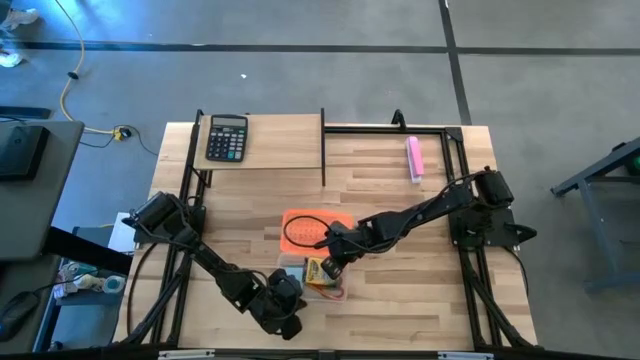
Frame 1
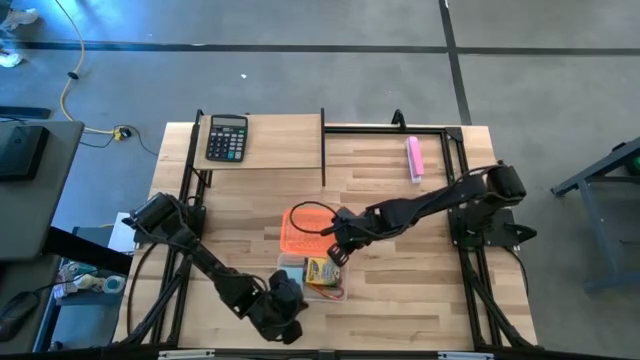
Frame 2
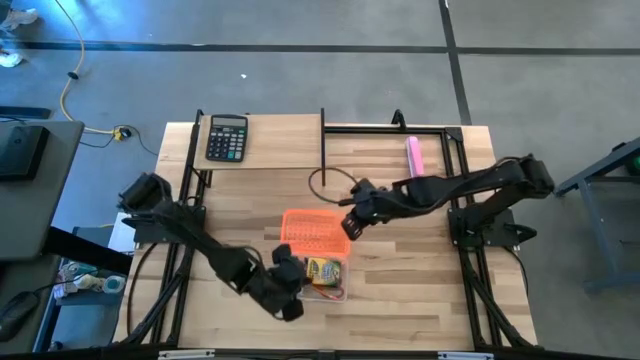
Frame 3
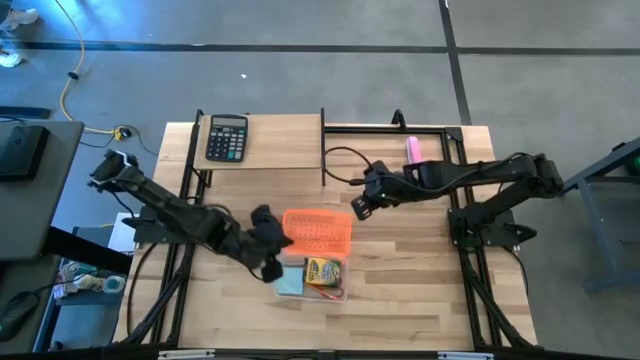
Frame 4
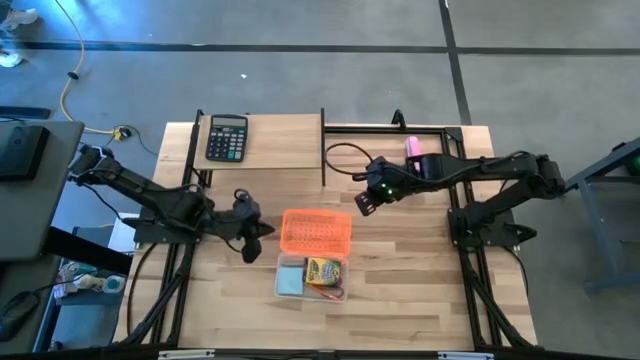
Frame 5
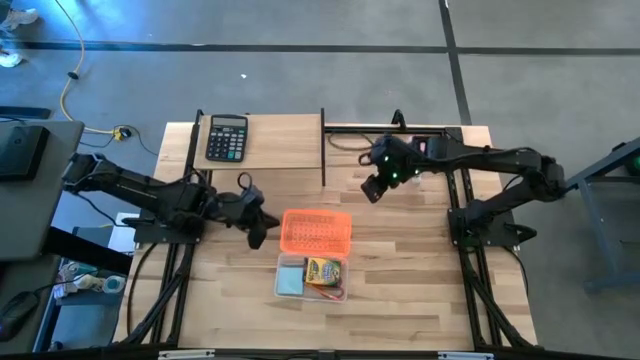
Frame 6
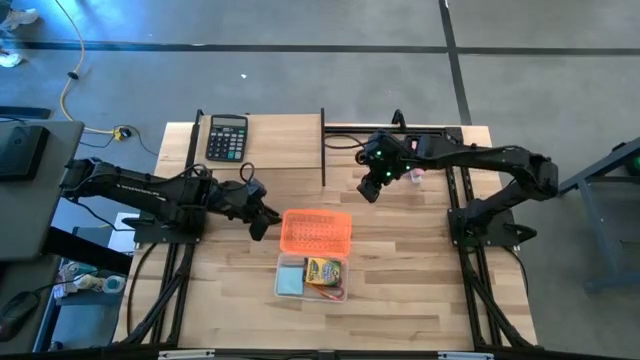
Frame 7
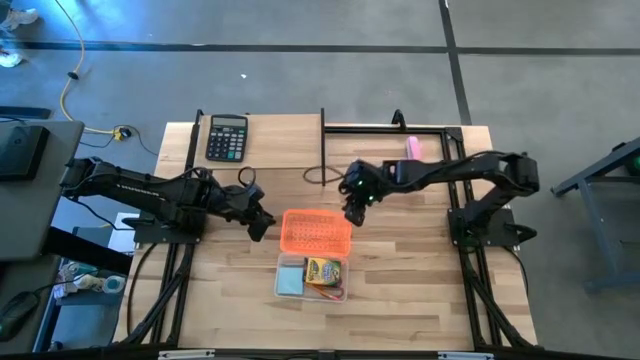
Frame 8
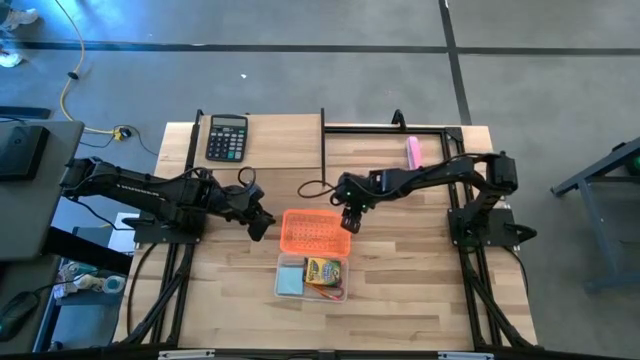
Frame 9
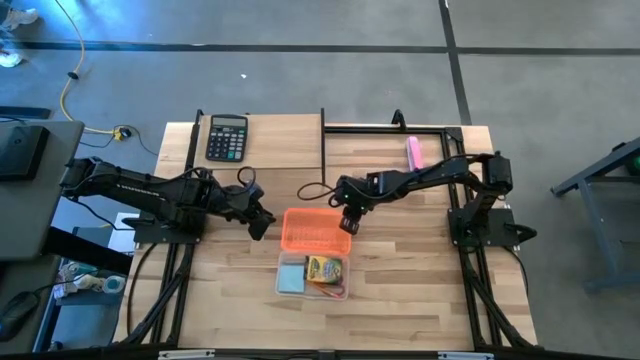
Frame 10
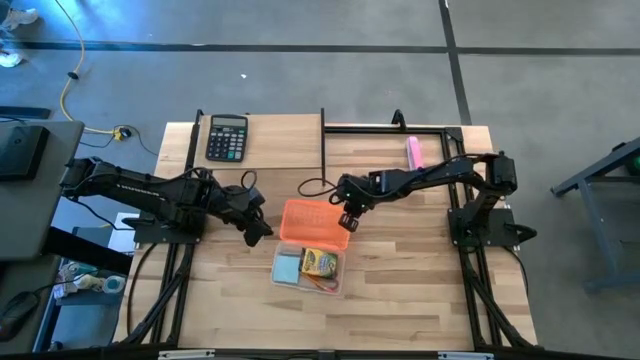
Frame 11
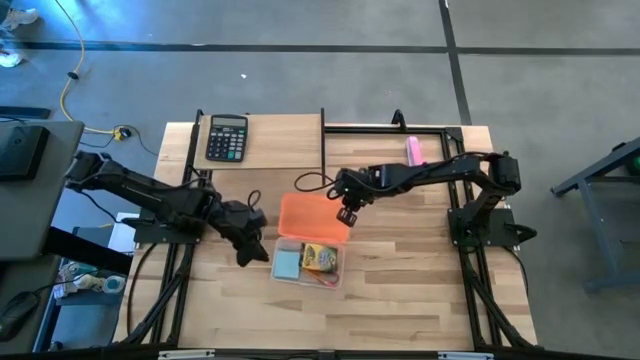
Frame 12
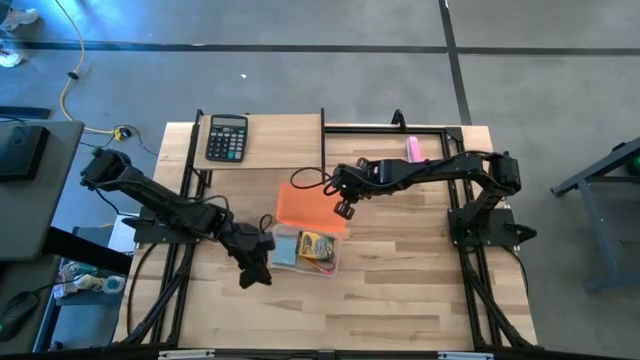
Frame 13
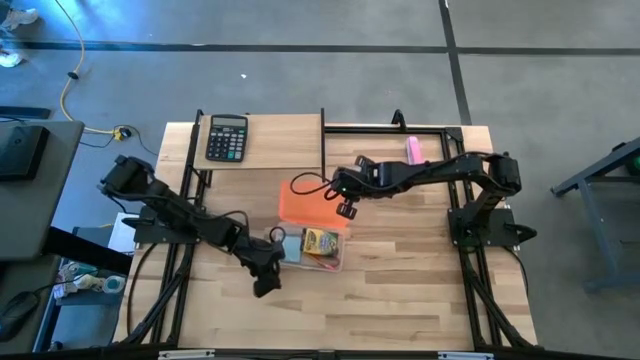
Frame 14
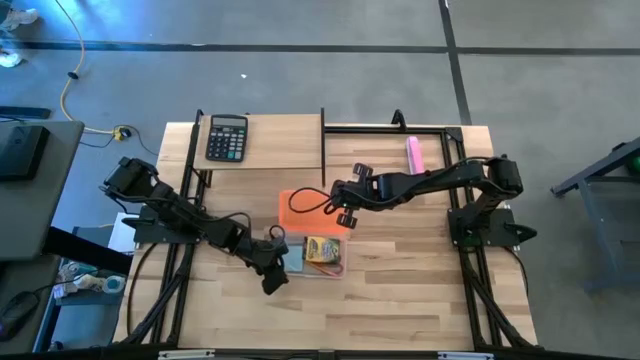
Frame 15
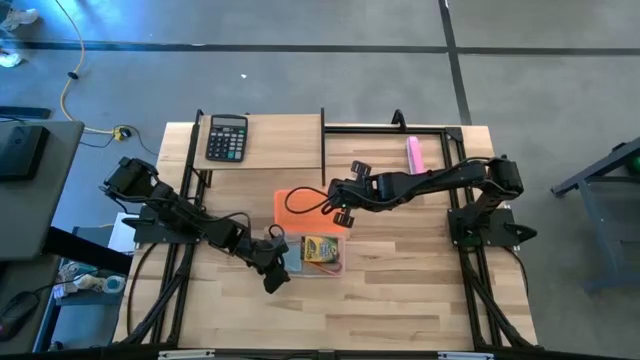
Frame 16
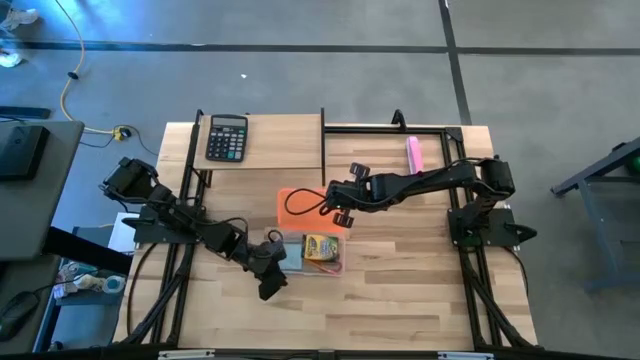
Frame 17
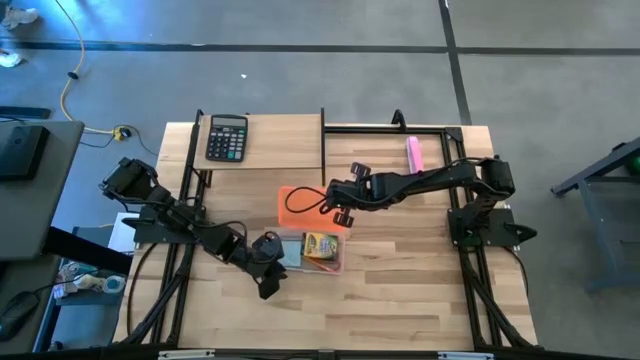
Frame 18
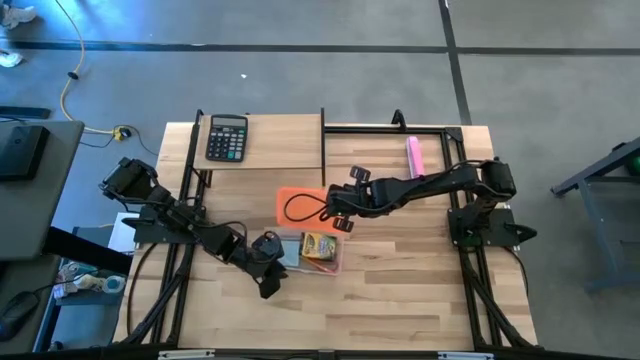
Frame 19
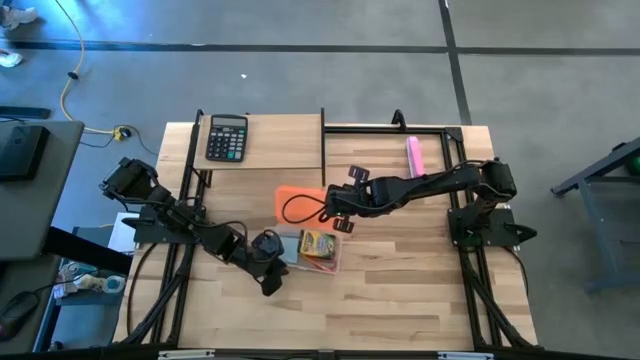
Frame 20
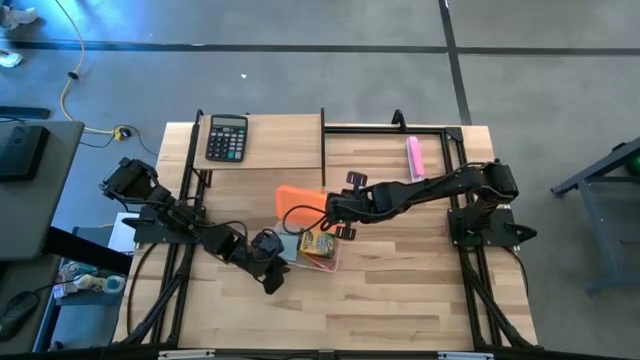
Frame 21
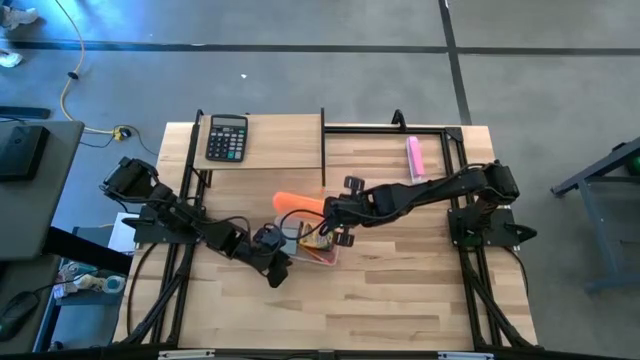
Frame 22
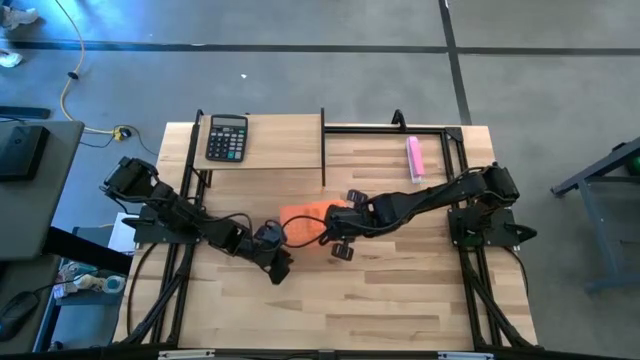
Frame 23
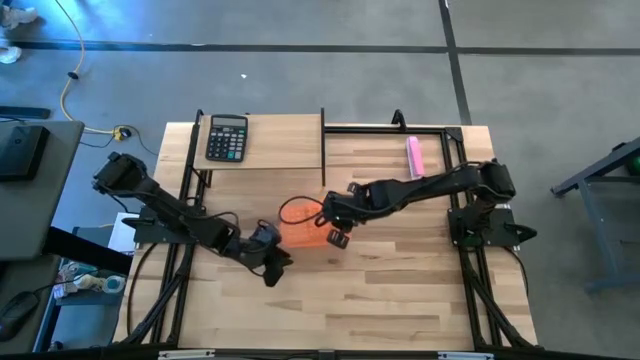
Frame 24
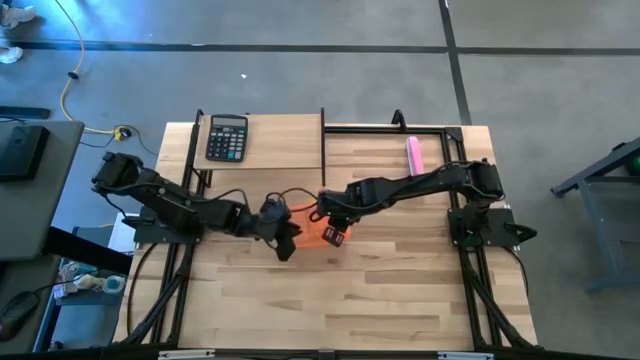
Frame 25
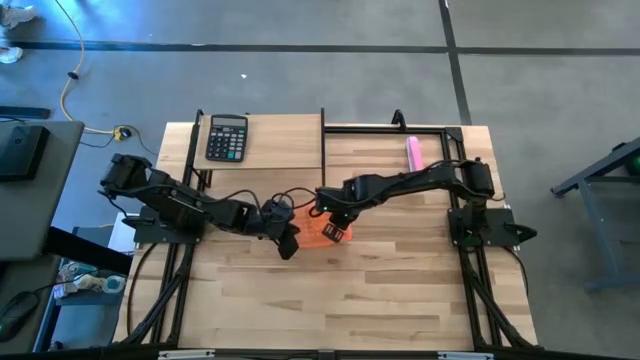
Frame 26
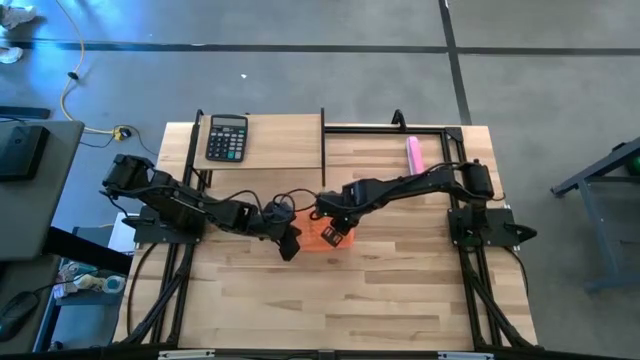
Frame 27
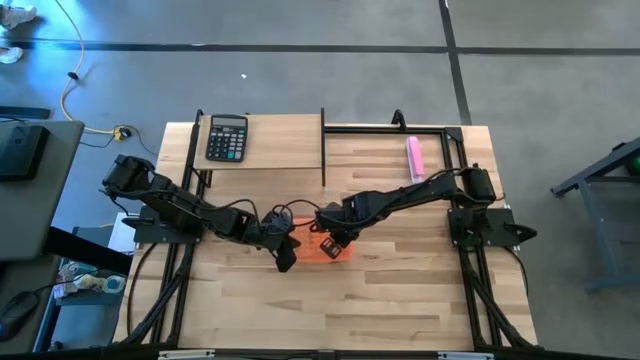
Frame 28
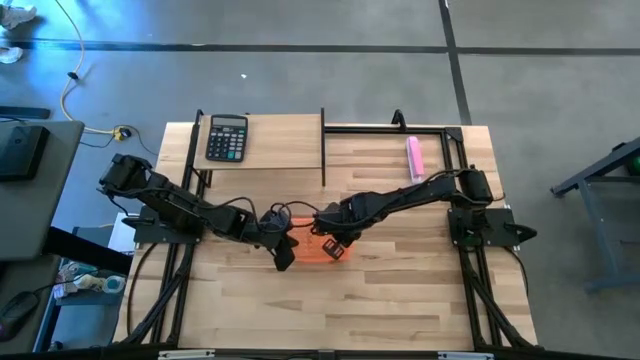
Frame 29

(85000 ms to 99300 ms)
Task: Pack school essentials
Close the orange supply box

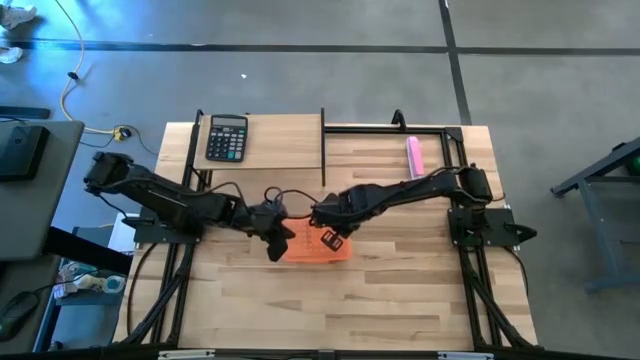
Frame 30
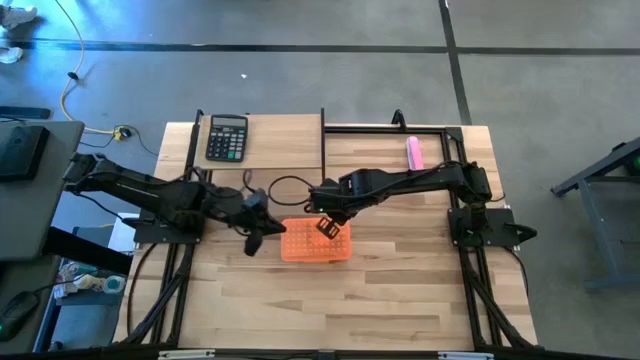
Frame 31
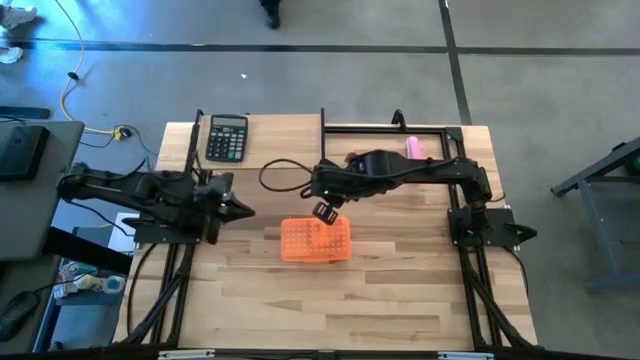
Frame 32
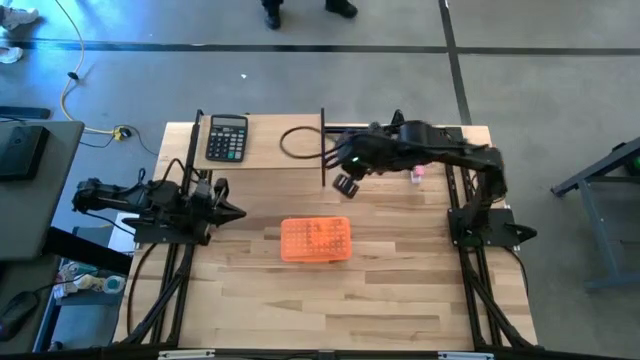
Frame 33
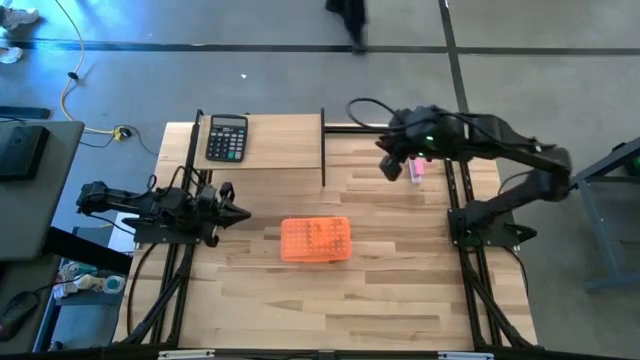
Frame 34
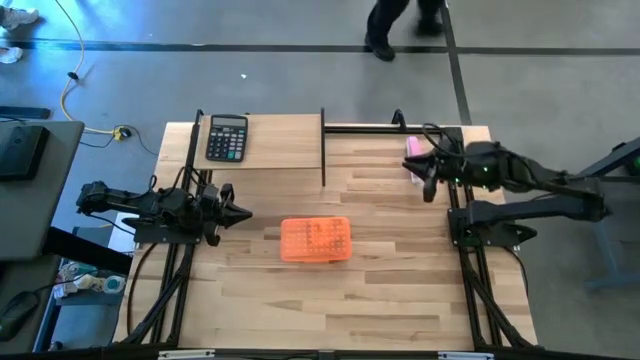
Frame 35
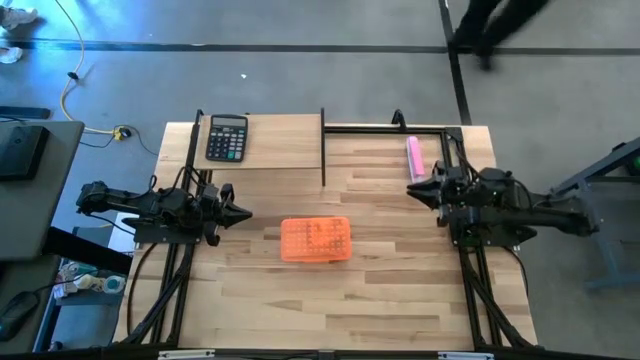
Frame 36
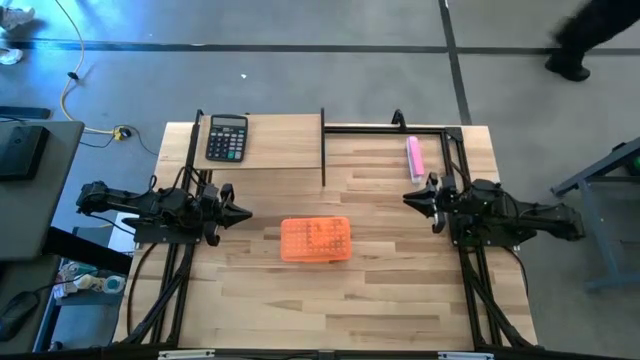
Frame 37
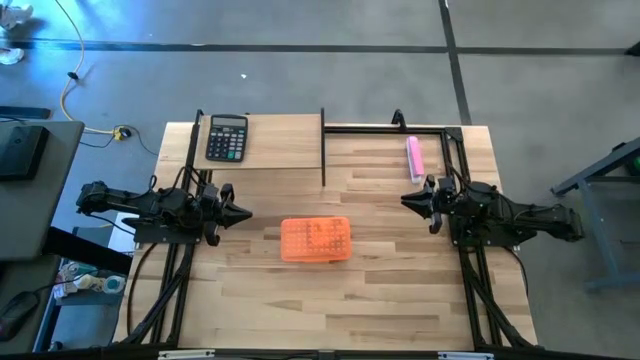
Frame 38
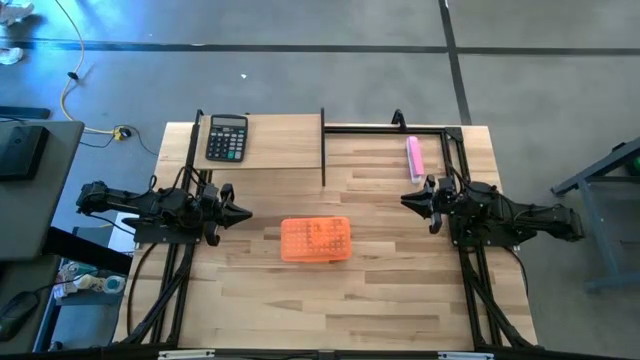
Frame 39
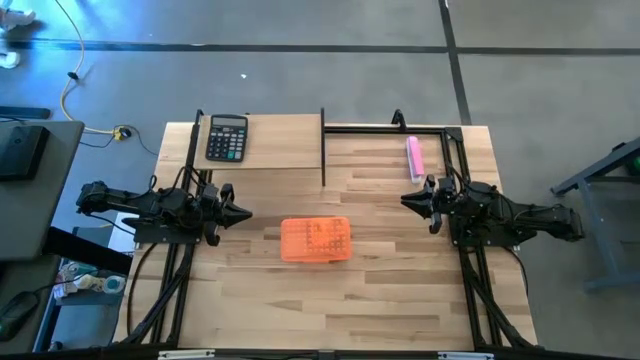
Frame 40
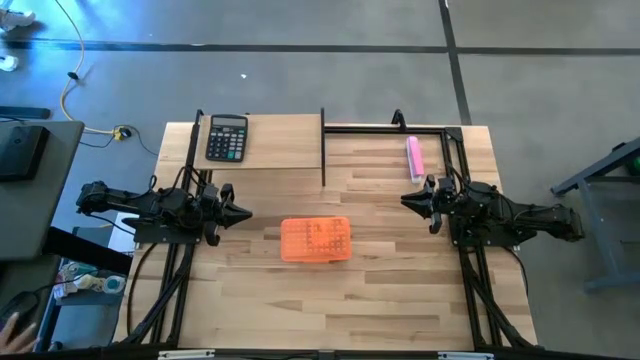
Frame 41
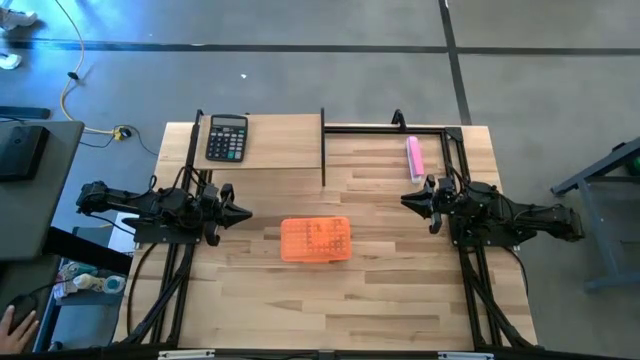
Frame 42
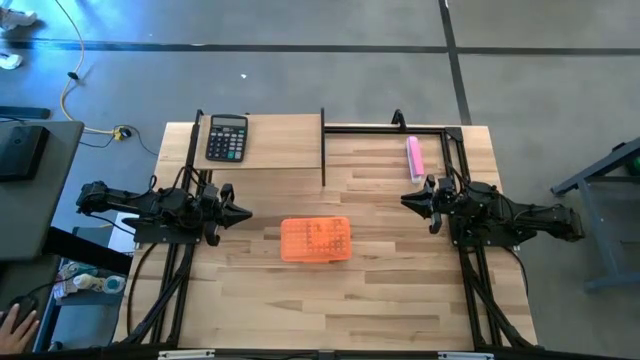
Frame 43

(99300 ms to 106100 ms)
Return to Home Position
